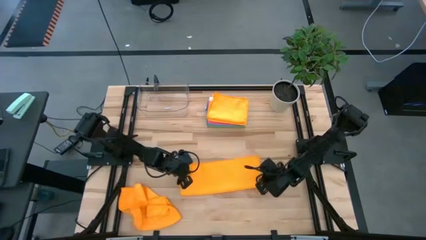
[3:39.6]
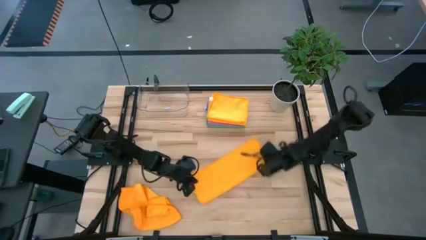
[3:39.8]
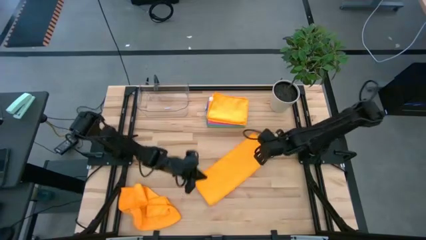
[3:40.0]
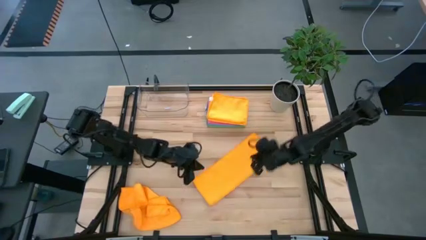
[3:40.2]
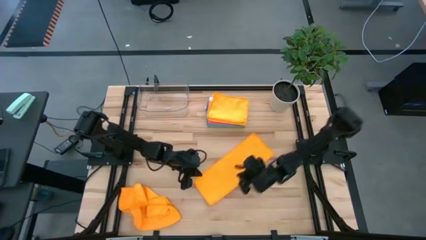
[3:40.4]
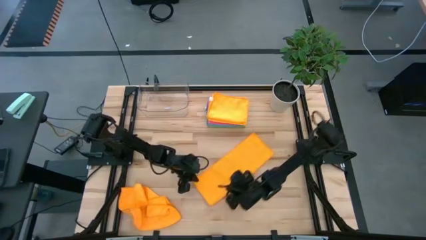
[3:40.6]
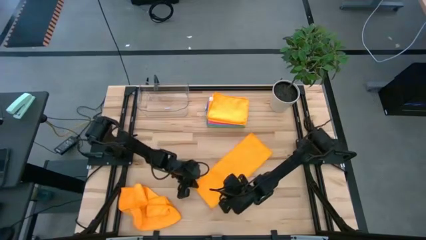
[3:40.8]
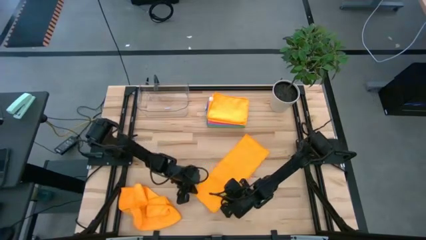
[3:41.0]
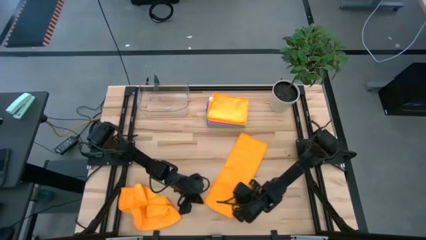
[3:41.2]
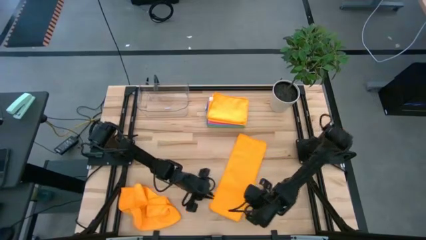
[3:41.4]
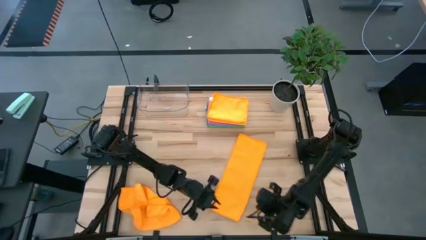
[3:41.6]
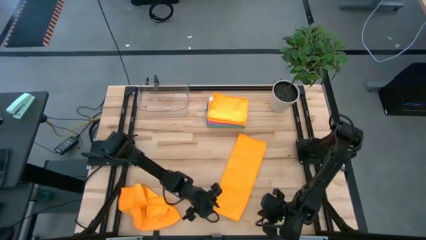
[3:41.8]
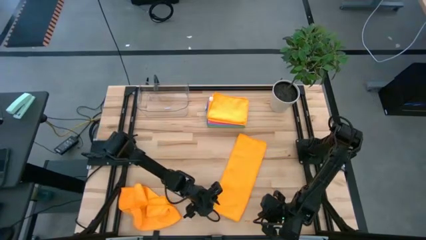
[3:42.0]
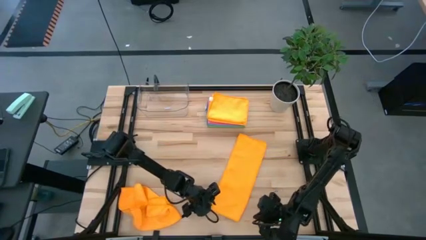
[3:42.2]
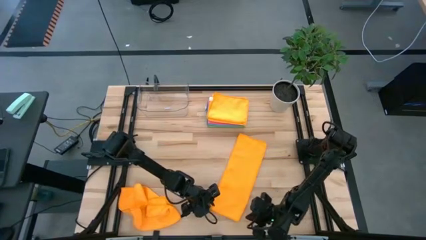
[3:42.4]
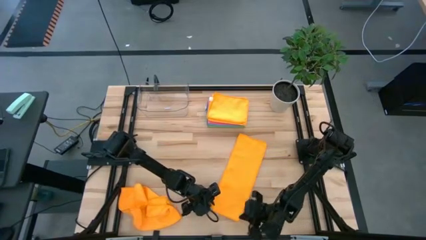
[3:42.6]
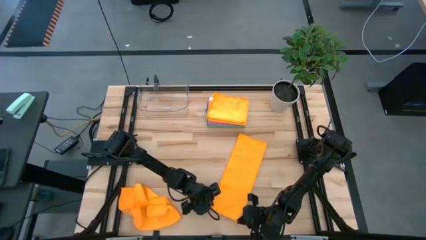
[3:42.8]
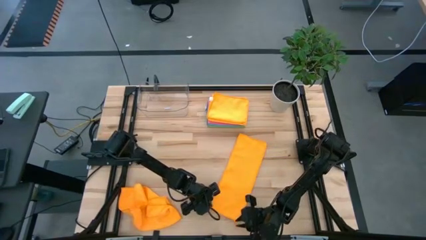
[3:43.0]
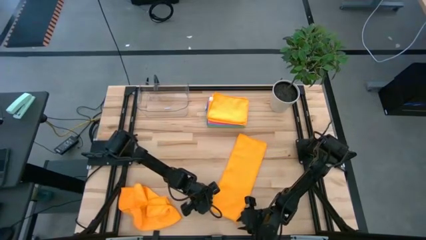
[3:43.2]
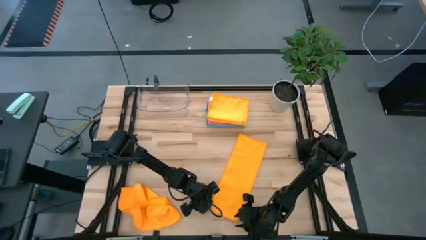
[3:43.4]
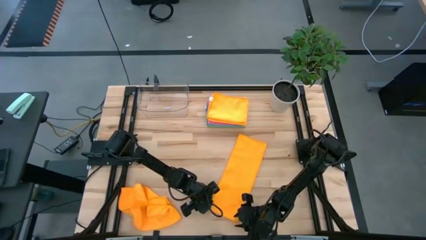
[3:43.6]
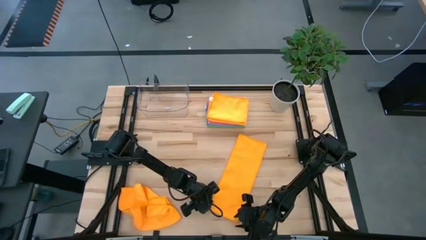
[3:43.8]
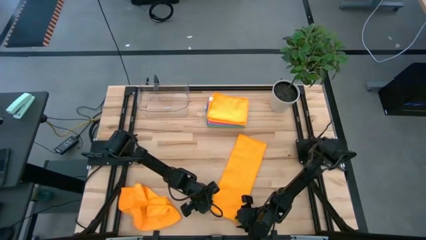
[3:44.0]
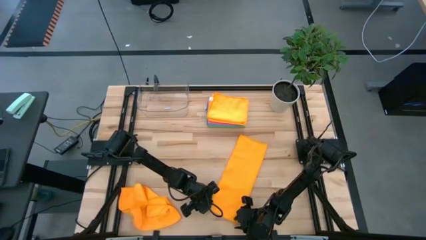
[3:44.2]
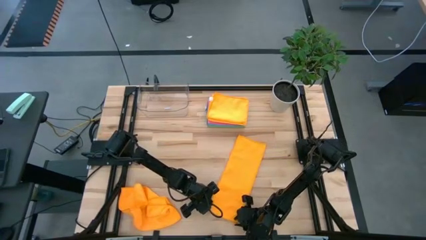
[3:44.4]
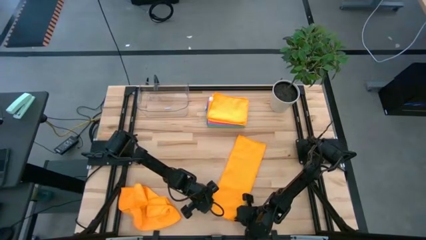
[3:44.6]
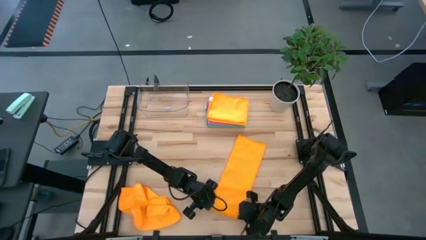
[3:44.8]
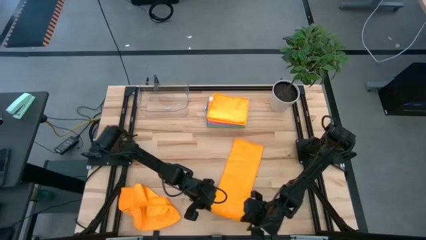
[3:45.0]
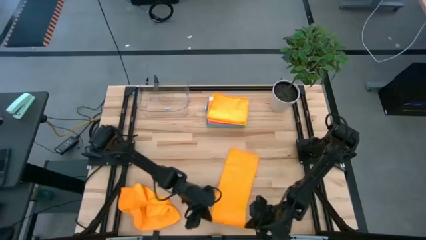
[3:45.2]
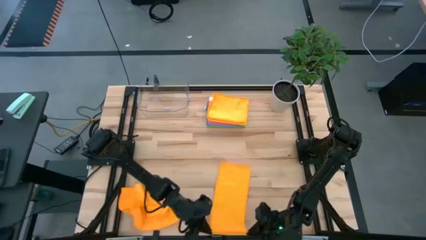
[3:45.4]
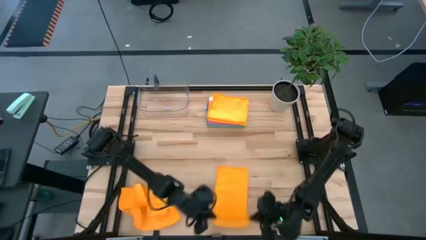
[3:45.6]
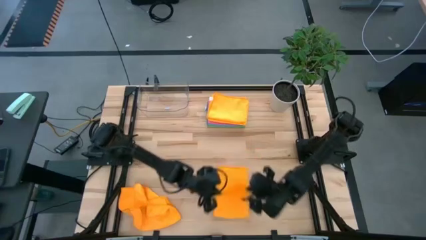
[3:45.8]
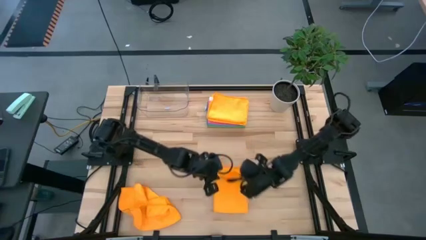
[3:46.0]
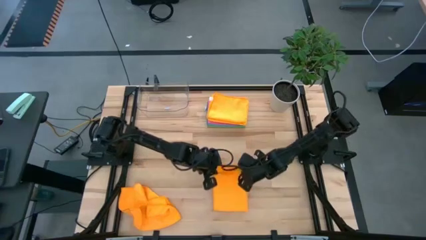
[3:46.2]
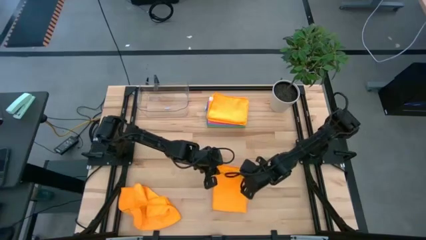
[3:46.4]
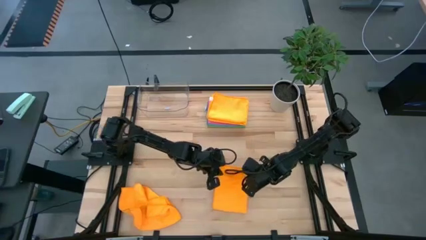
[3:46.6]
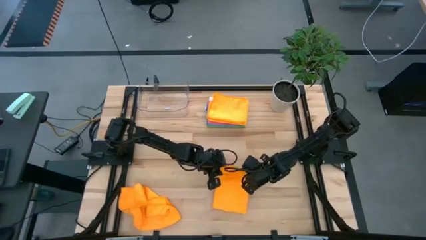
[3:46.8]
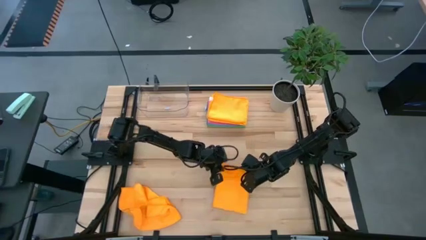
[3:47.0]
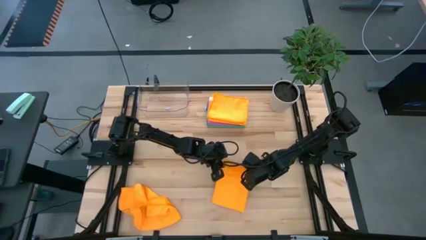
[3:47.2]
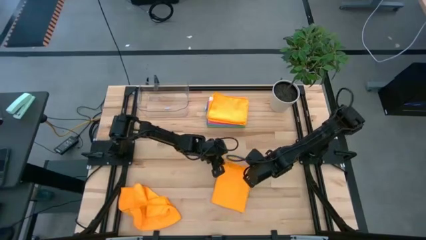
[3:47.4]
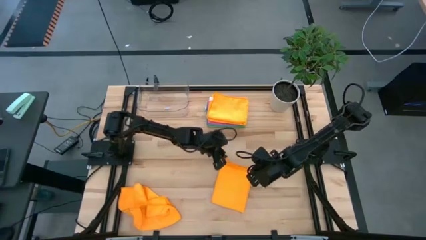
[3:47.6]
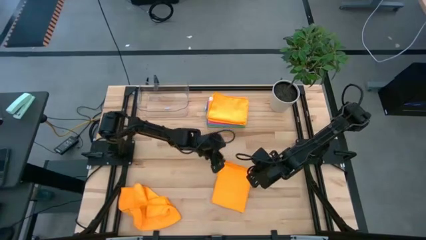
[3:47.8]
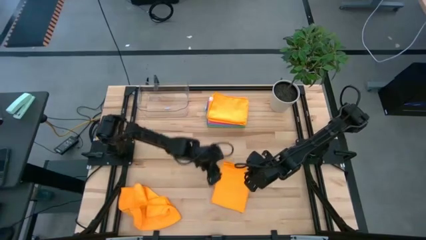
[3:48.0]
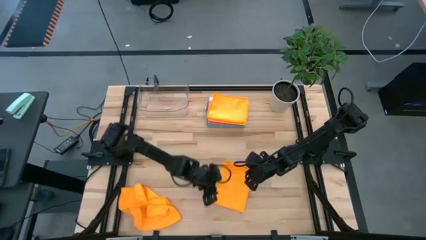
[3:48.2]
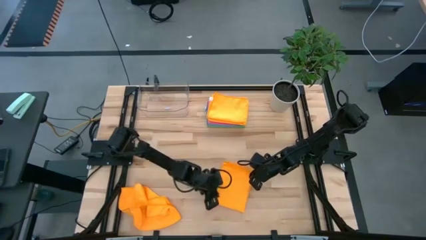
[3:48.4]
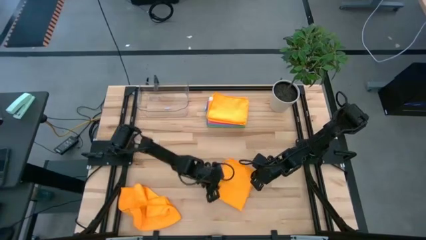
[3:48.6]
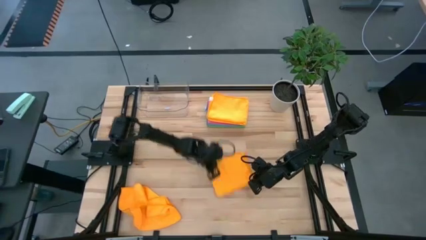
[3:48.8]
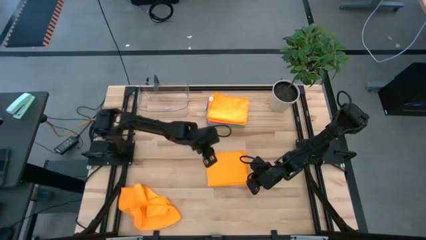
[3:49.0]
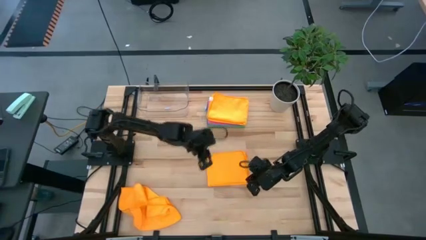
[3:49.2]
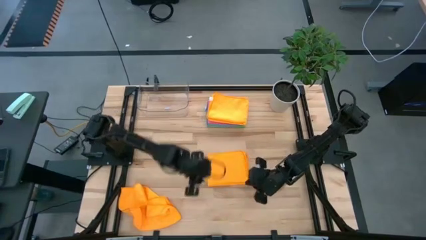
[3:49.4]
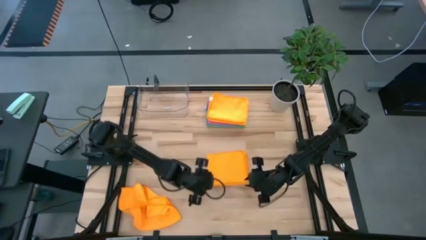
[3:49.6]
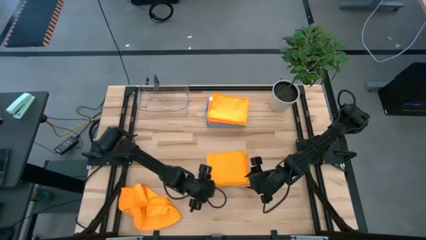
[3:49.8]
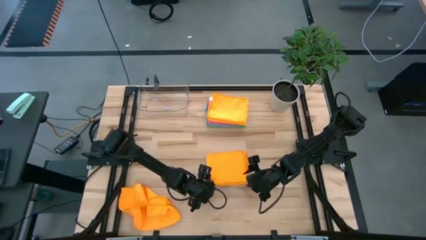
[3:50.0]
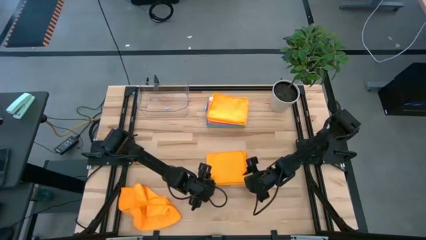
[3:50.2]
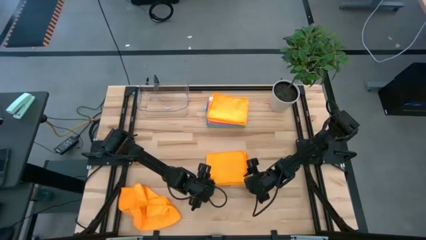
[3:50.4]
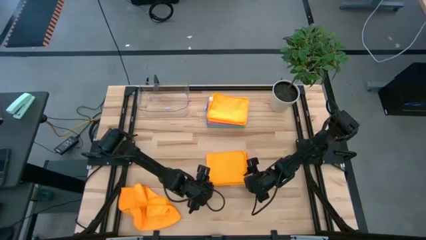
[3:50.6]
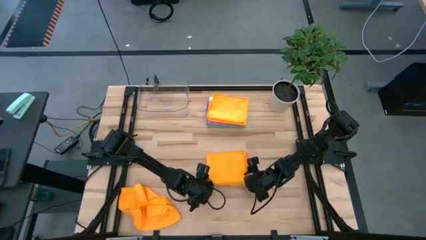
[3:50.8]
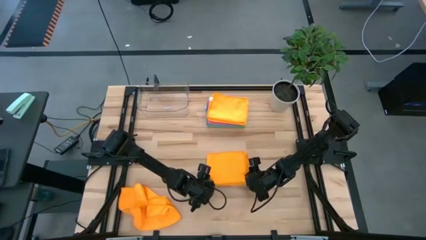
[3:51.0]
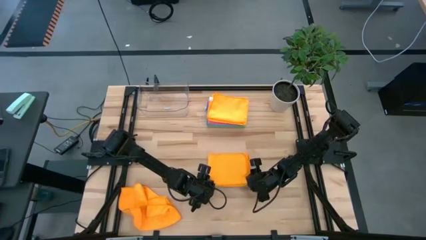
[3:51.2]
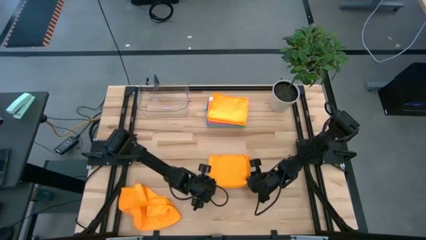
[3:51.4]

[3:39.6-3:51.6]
Task: Fold microfiber towels
Fold the top yellow towel

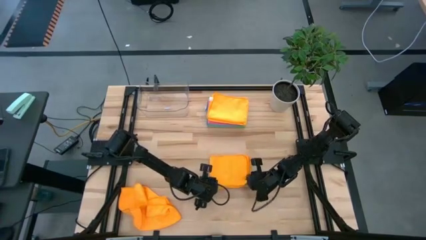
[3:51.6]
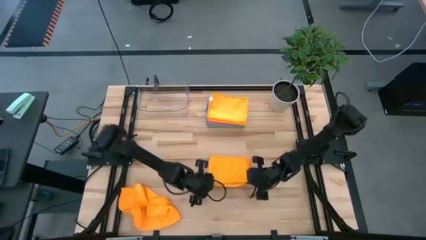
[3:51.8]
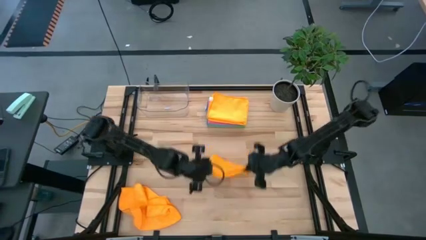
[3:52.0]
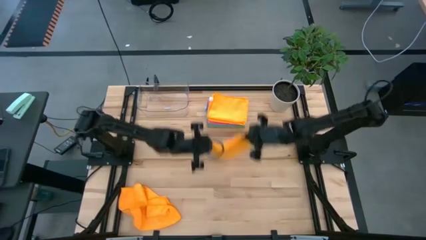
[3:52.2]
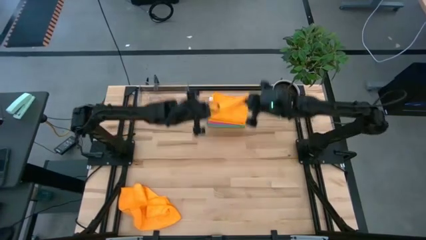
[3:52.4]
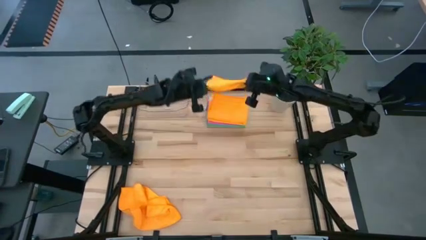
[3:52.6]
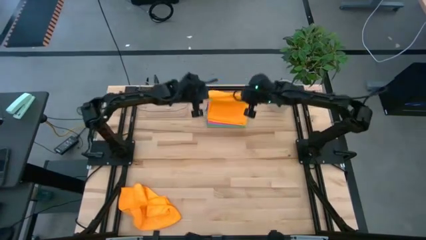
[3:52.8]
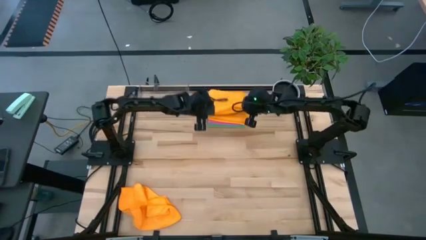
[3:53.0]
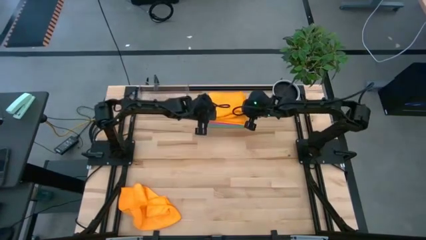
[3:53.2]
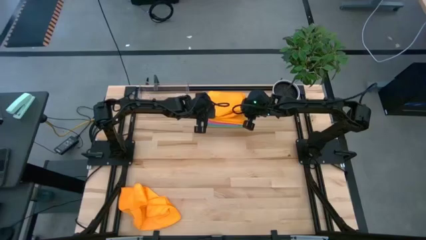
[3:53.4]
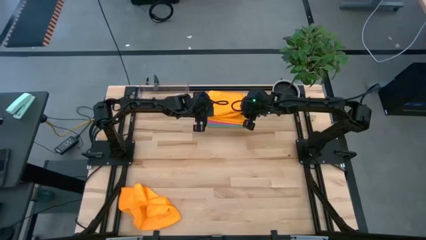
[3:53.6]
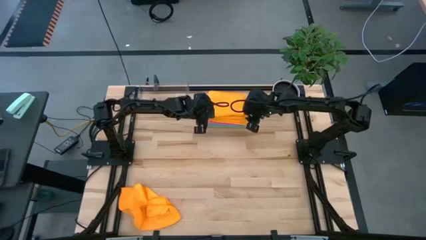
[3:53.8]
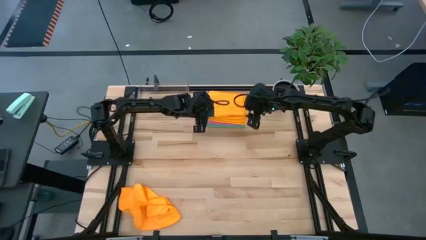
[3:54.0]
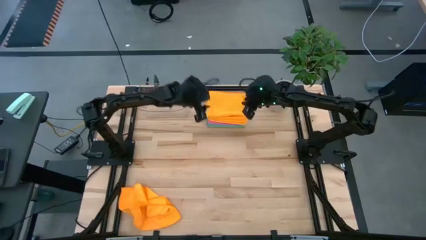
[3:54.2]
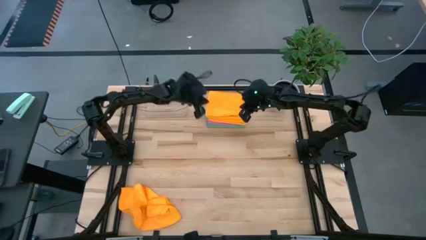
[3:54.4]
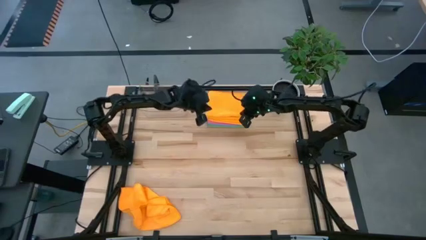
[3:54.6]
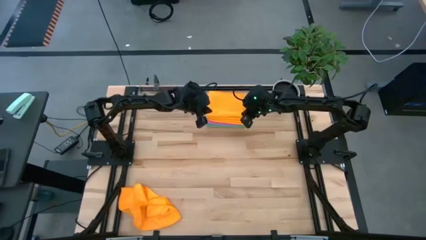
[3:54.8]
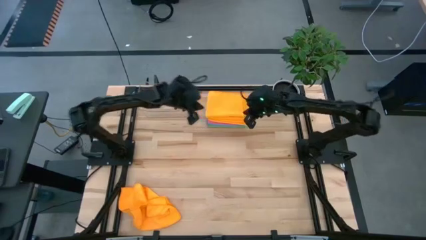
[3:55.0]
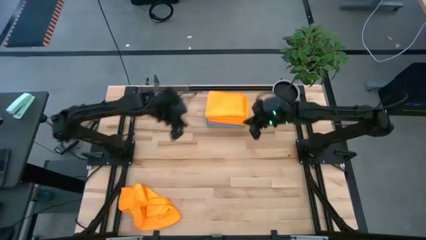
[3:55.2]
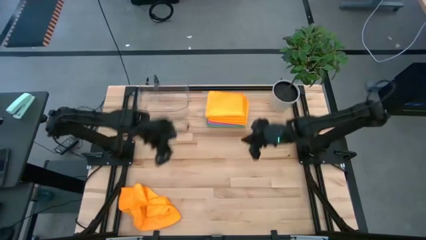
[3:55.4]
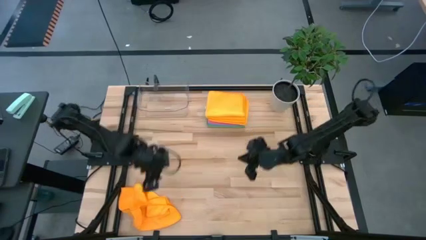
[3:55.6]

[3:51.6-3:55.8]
Stack the folded orange towel on the folded orange towel

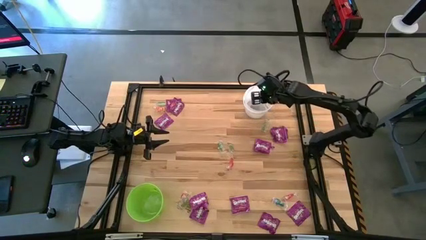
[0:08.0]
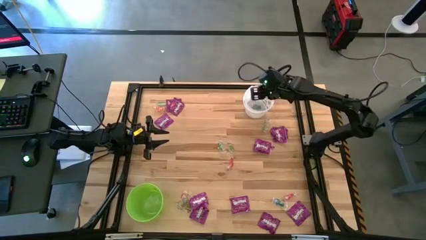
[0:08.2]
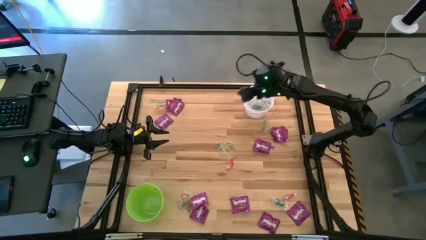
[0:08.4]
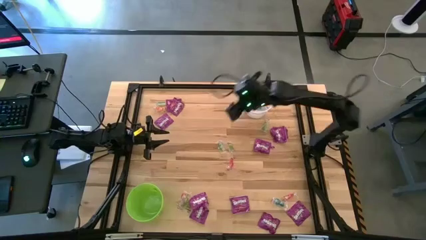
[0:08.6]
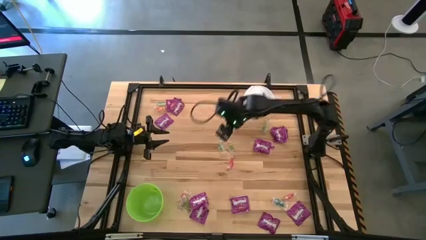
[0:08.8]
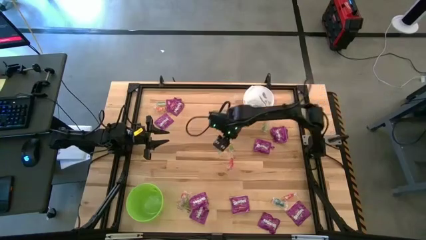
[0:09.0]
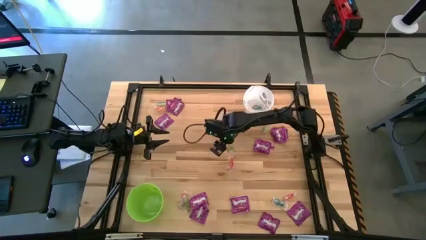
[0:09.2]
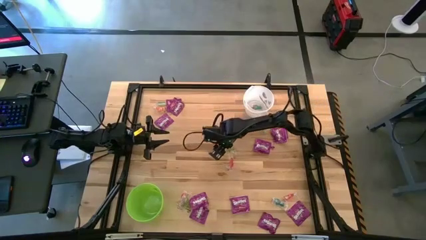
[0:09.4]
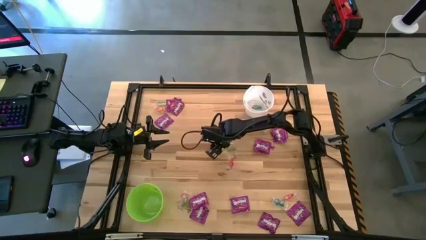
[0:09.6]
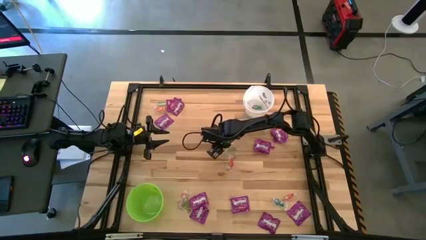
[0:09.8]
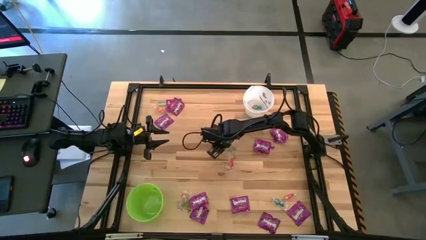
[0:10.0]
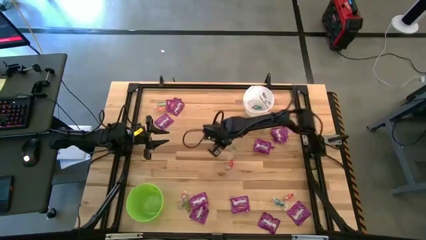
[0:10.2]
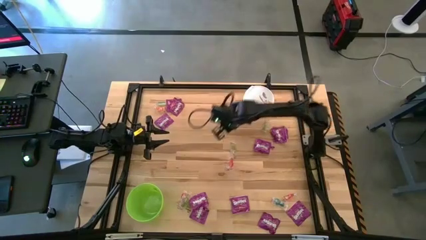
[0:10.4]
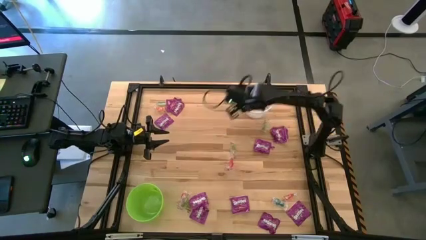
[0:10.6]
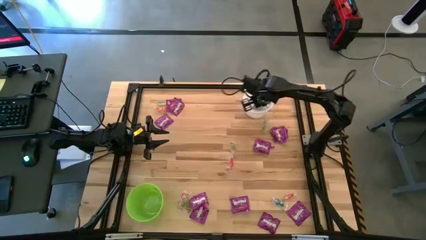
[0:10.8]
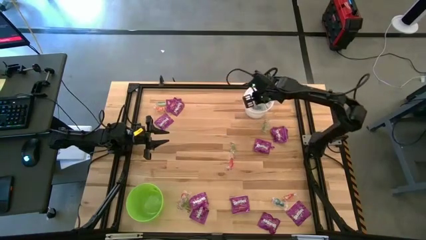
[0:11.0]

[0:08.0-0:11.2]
Task: Sort candy by brand, put in halloween buckets
Put the green gummy into the white bucket
